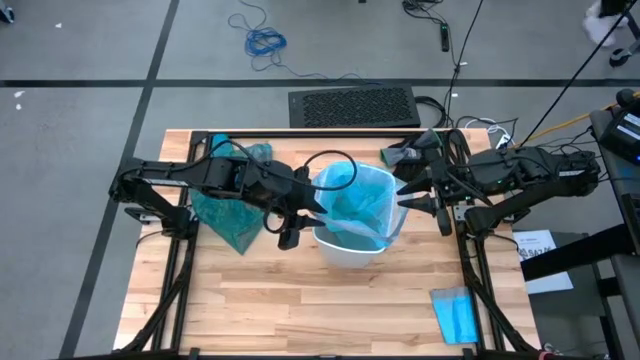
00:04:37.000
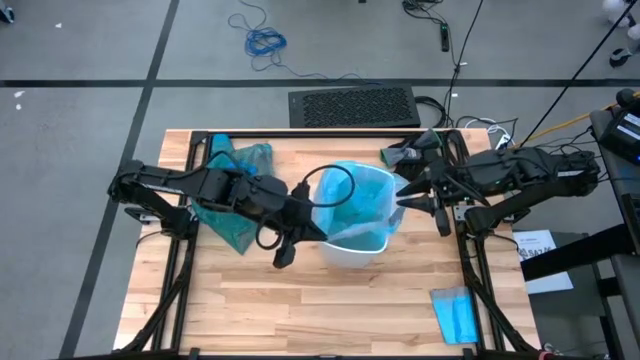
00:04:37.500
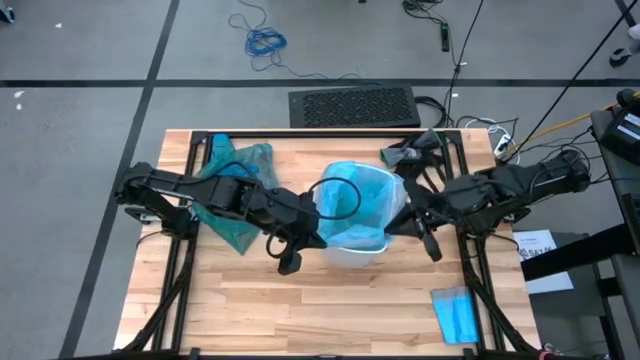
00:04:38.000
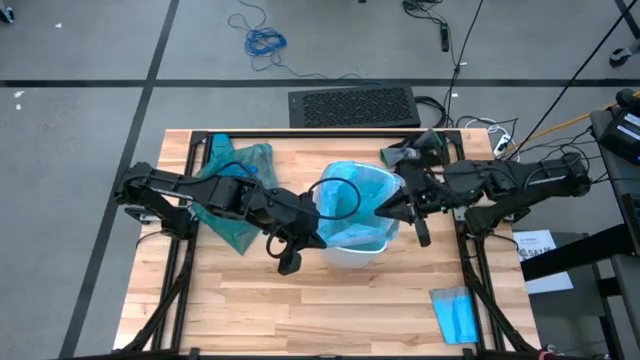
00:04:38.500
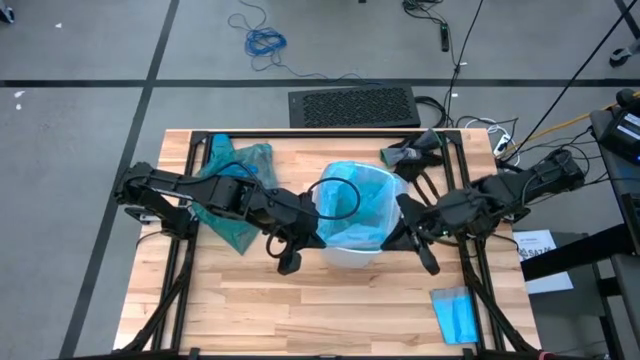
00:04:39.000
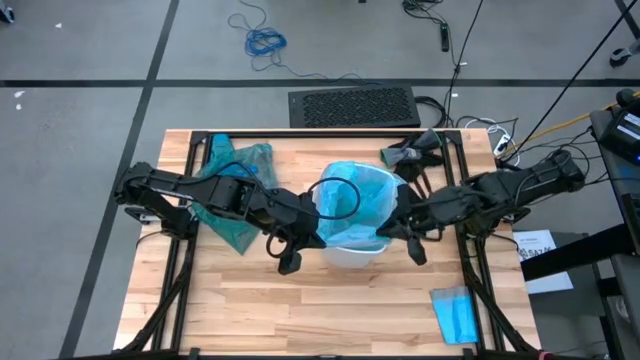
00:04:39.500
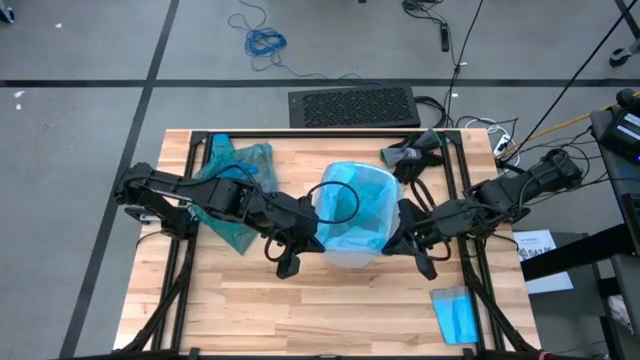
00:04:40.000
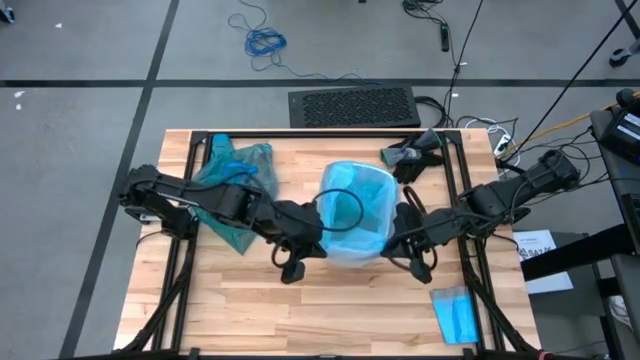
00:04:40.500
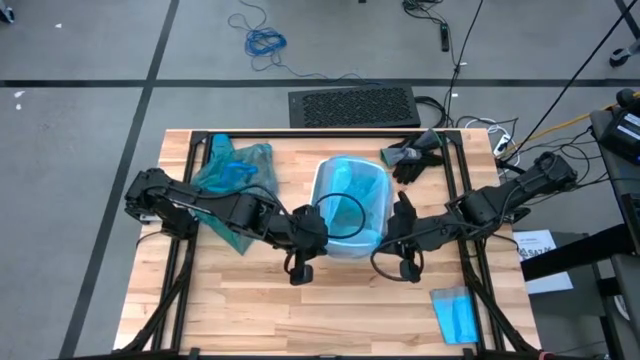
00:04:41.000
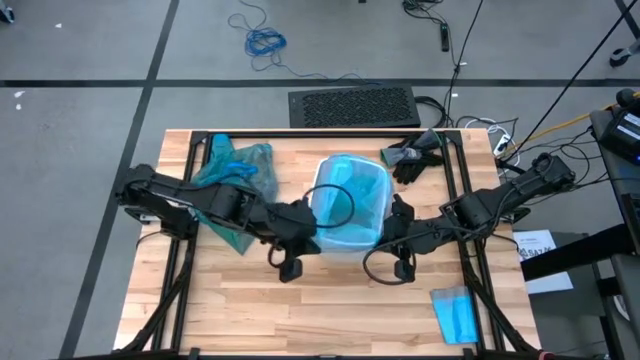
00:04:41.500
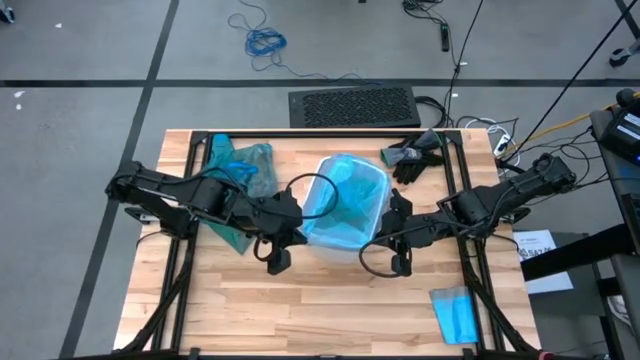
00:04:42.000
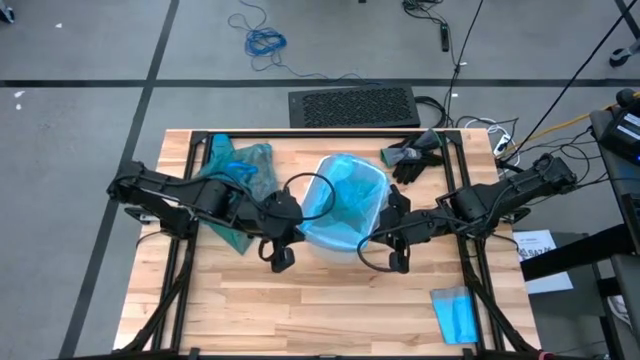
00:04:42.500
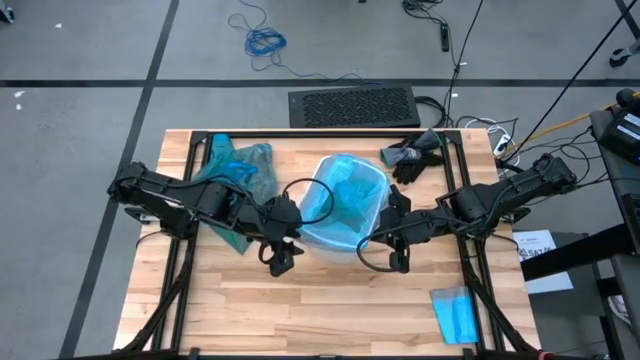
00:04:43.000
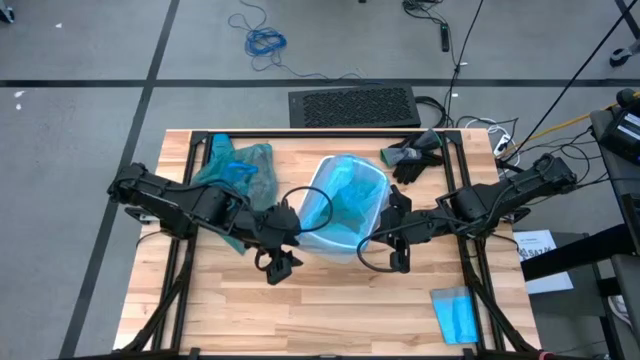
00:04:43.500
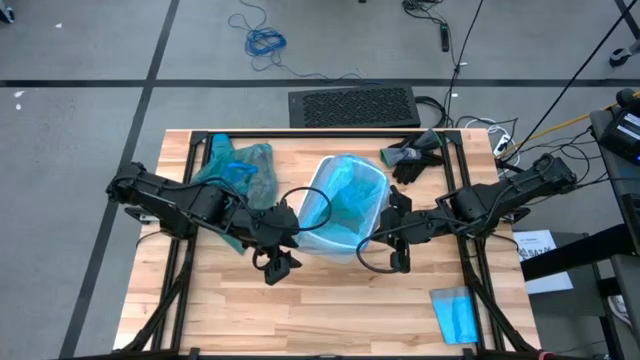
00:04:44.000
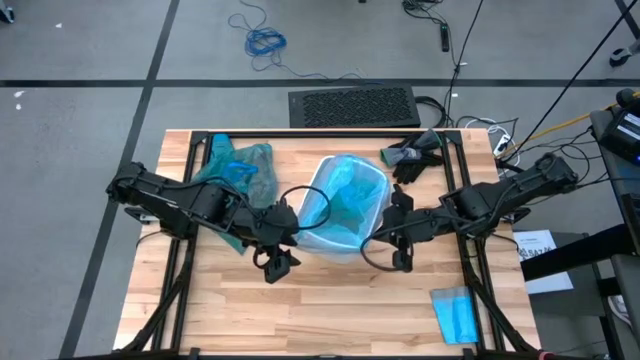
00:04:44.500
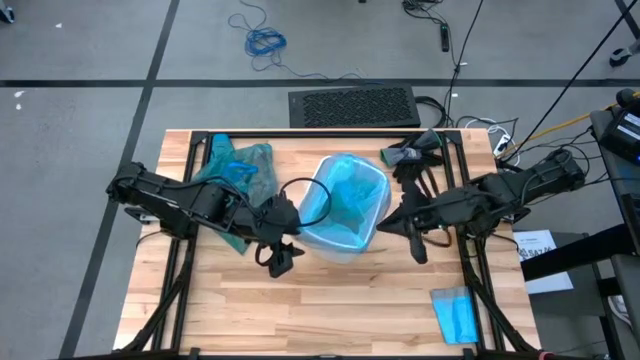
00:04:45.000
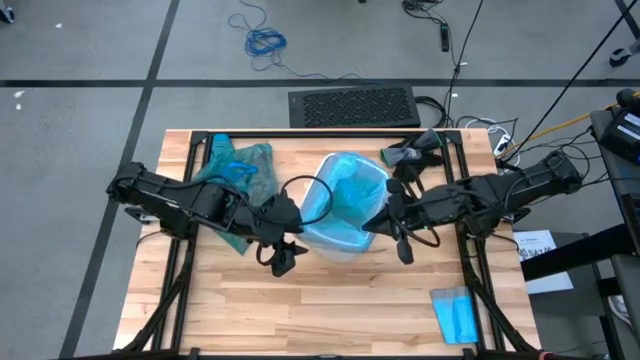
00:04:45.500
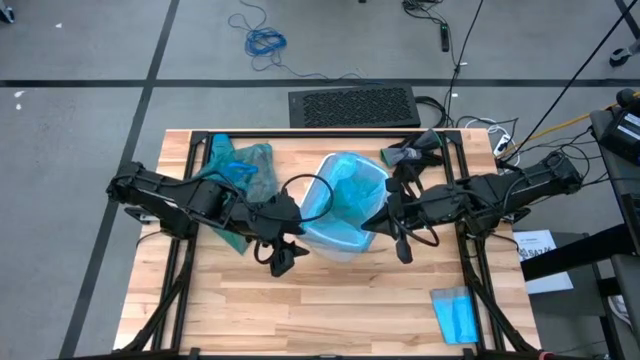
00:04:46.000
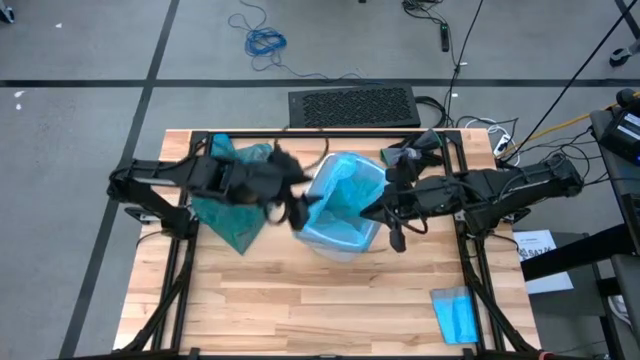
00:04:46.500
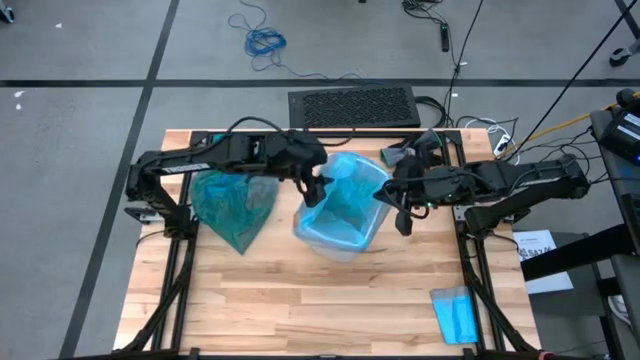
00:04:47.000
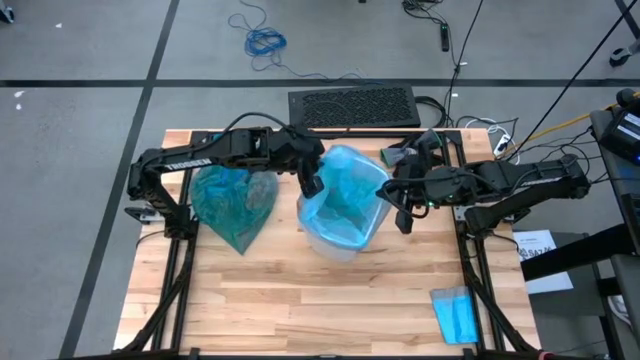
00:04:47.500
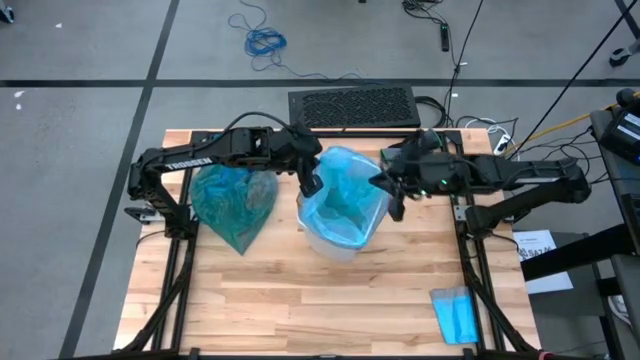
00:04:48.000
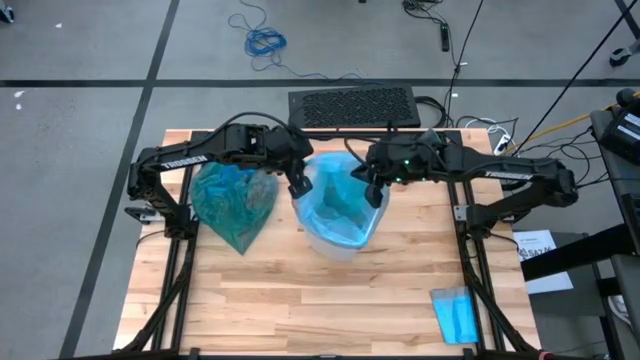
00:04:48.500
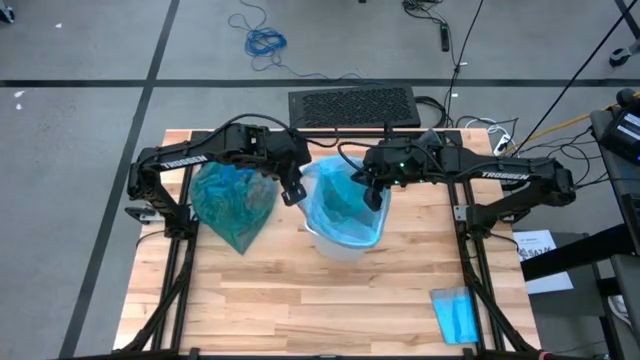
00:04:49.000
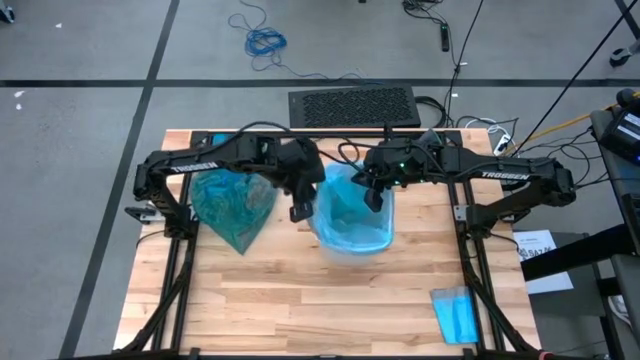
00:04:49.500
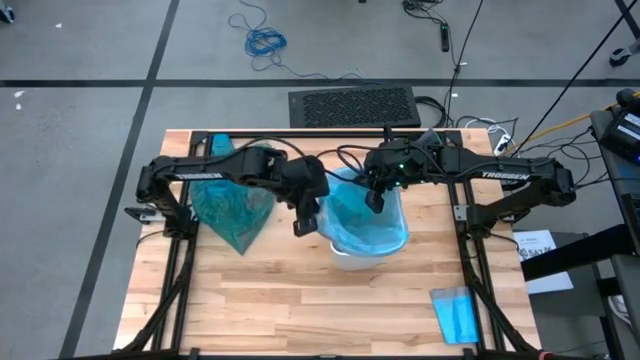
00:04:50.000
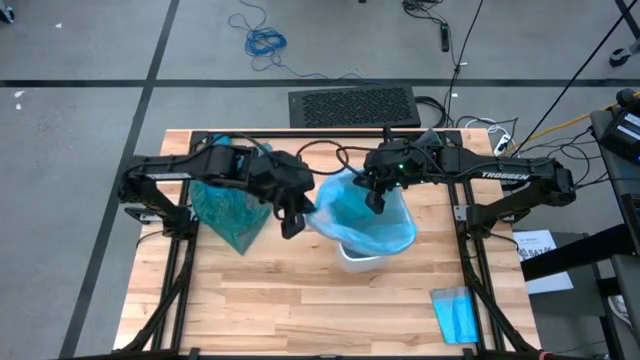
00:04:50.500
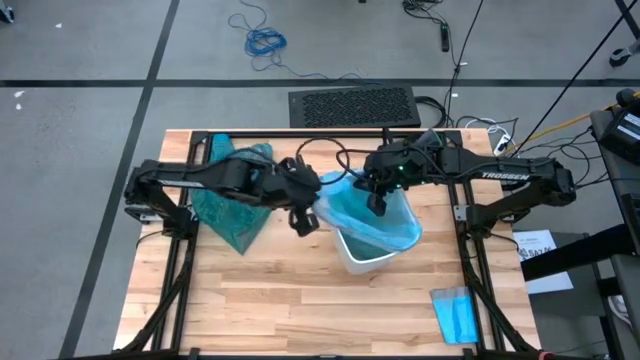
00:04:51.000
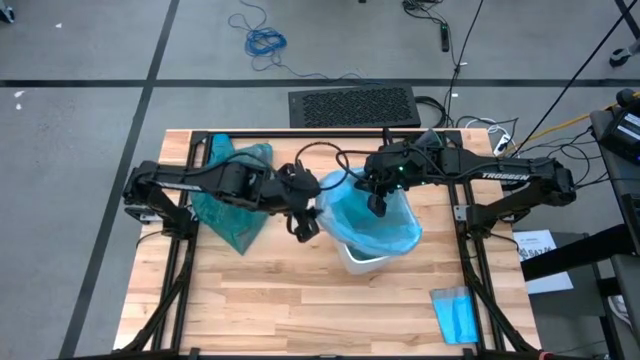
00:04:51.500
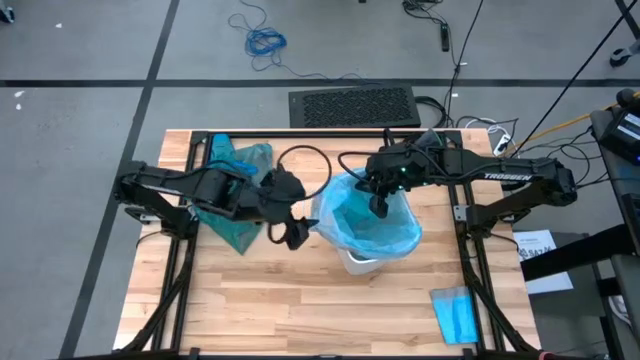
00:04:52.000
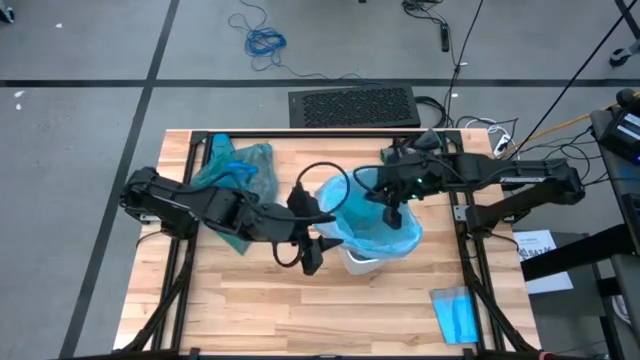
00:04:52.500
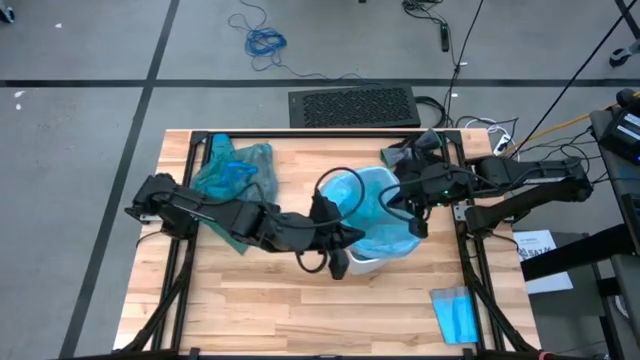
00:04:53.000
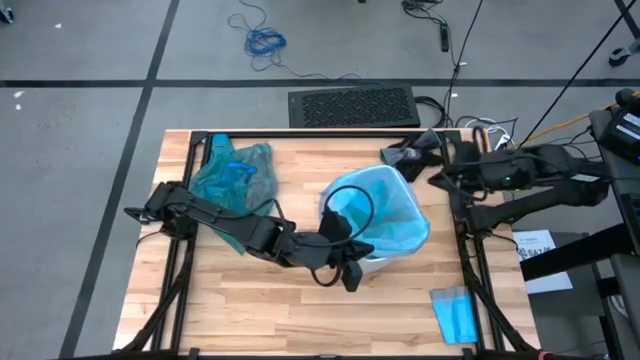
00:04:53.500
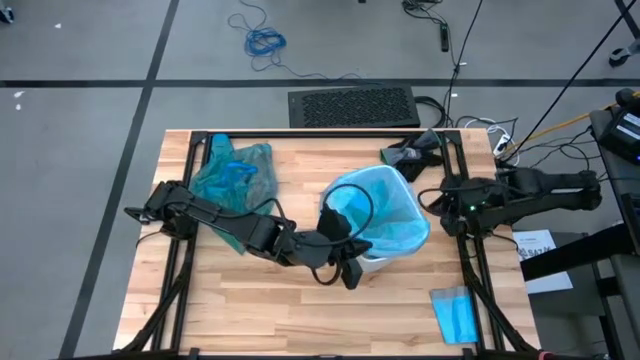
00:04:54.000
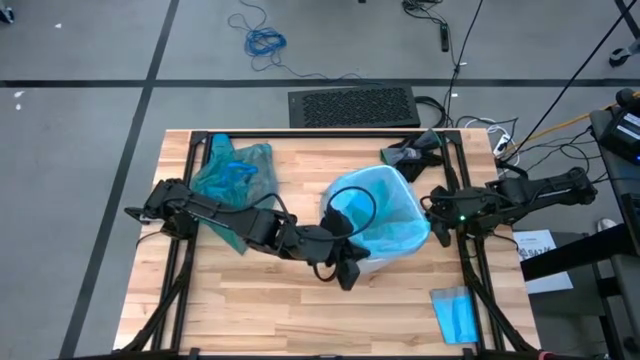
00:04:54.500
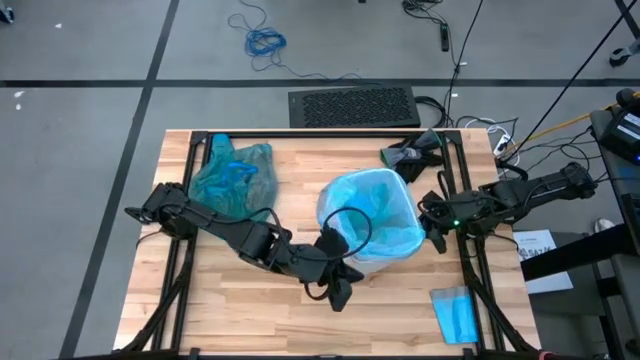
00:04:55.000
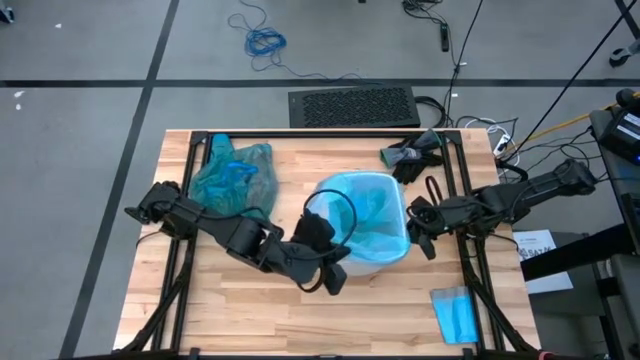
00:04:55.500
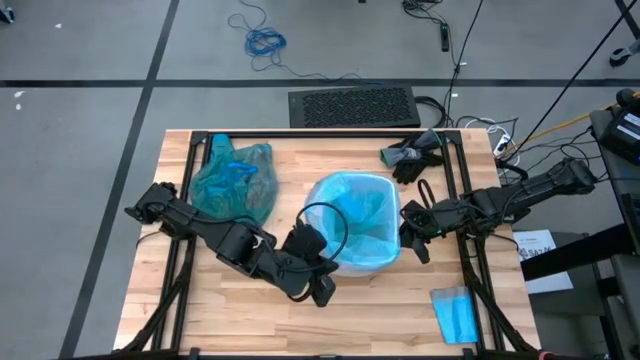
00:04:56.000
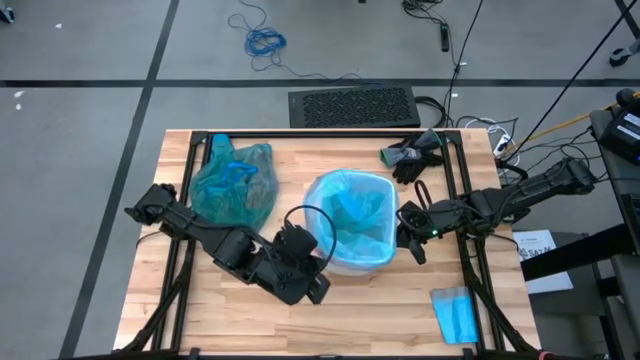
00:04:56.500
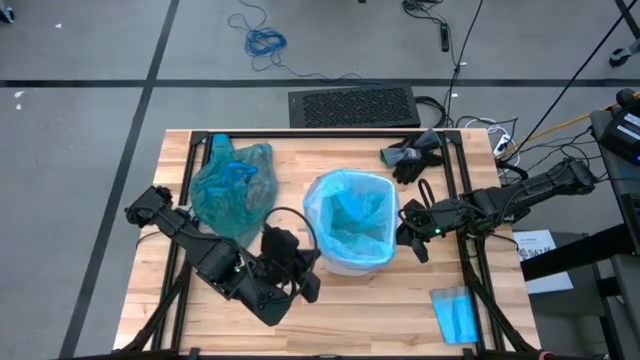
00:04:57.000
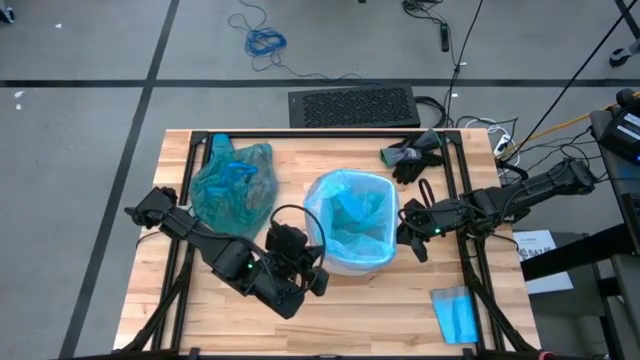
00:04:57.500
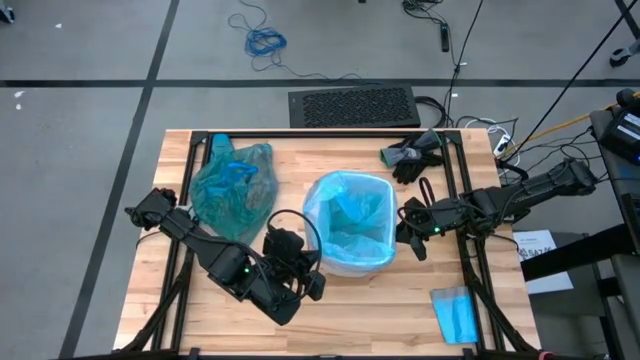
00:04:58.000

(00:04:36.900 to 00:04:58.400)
Task: place trash/remove bag and relplace
Insert the new blue trash bag into the trash bin
